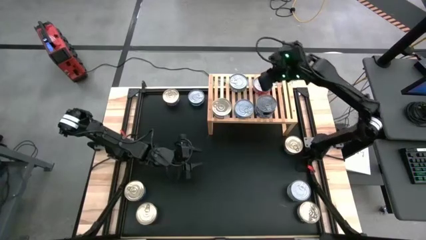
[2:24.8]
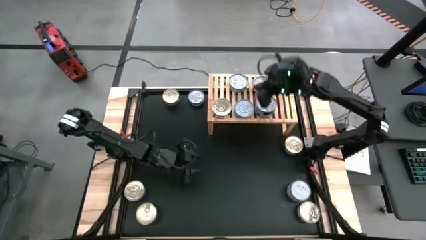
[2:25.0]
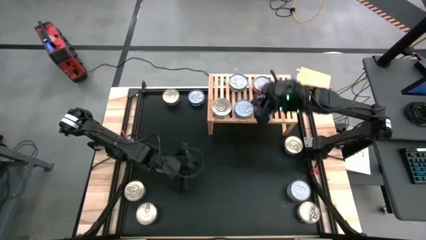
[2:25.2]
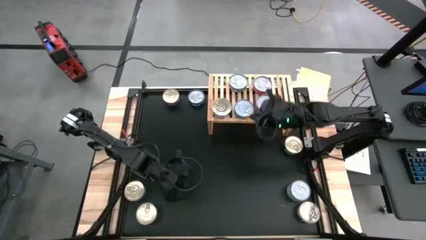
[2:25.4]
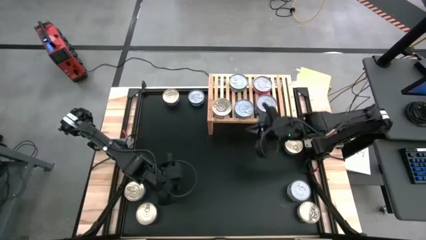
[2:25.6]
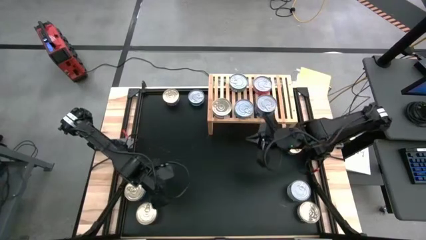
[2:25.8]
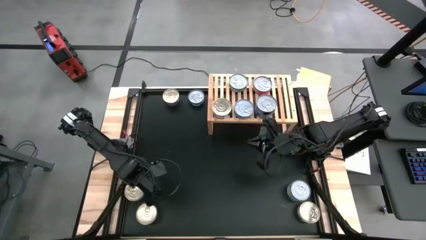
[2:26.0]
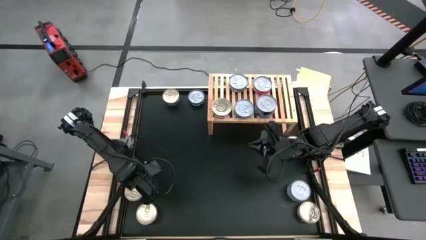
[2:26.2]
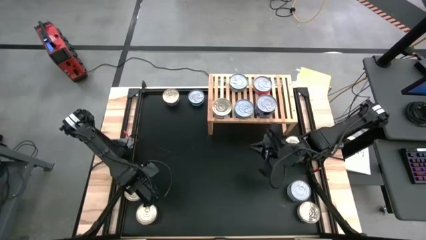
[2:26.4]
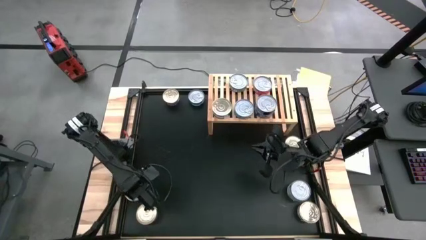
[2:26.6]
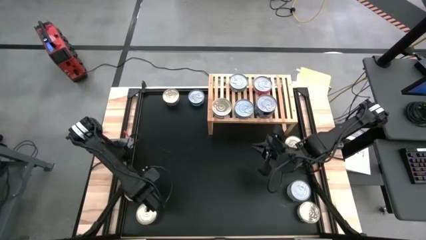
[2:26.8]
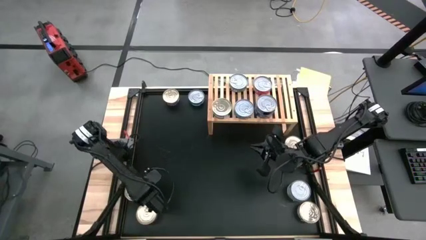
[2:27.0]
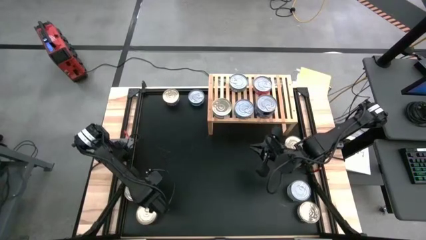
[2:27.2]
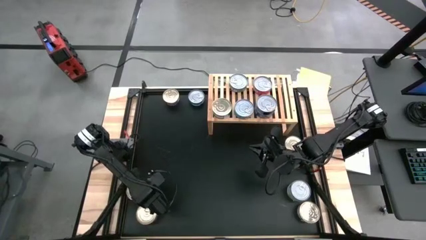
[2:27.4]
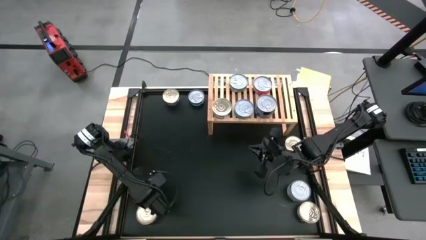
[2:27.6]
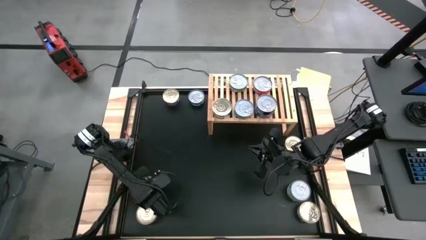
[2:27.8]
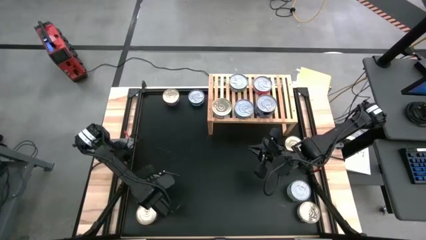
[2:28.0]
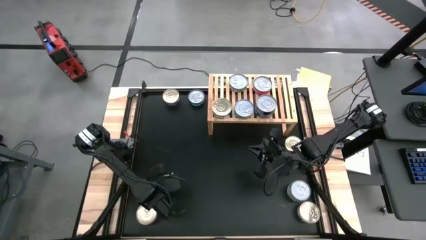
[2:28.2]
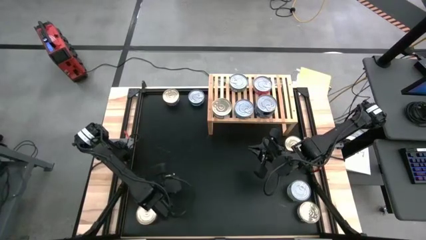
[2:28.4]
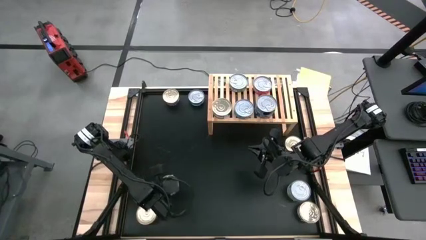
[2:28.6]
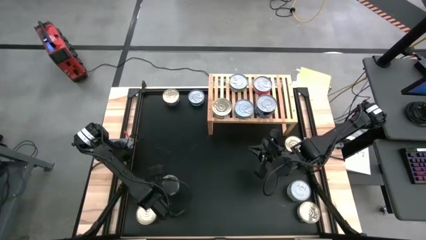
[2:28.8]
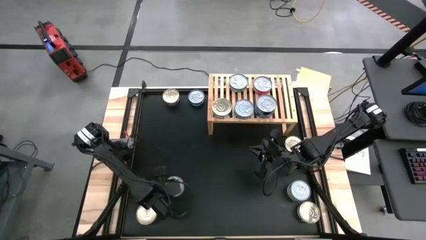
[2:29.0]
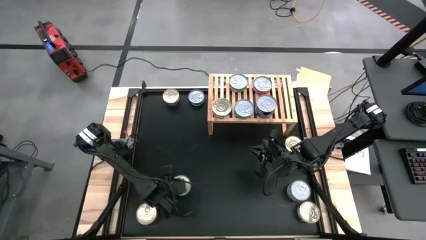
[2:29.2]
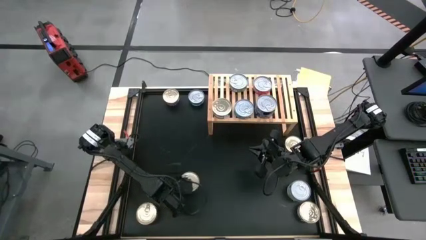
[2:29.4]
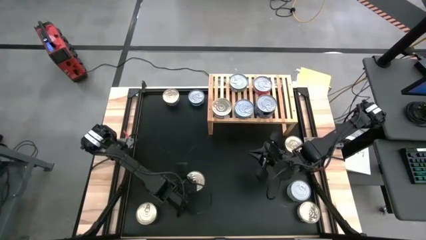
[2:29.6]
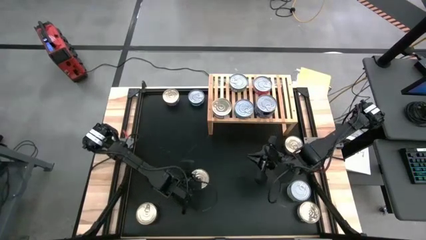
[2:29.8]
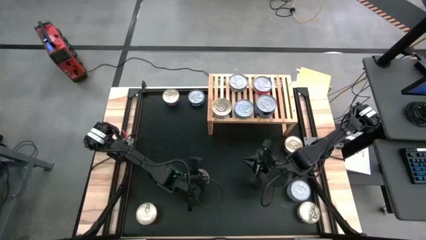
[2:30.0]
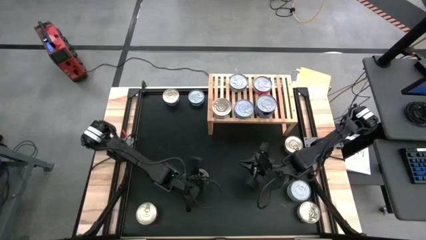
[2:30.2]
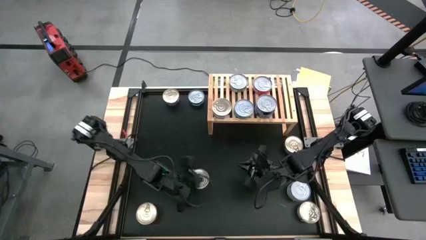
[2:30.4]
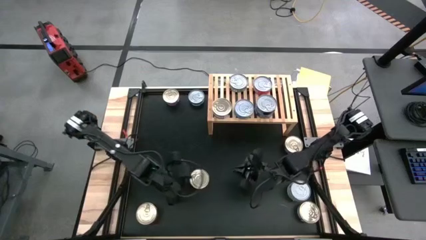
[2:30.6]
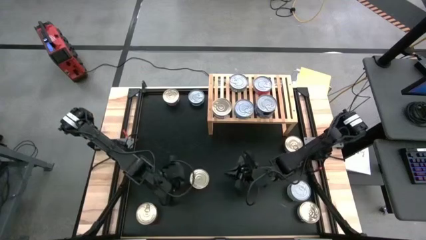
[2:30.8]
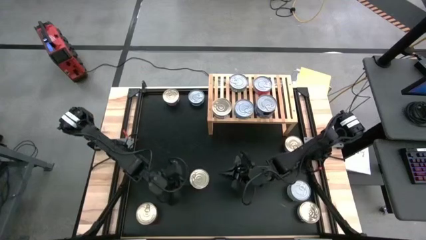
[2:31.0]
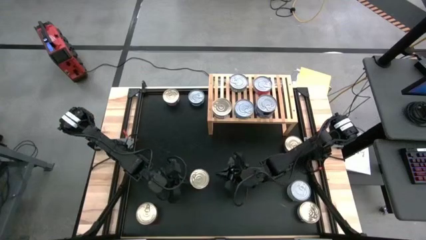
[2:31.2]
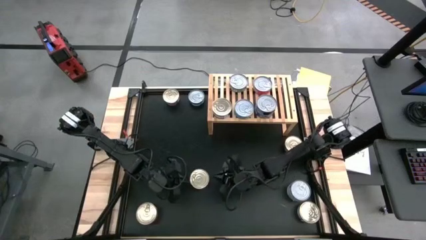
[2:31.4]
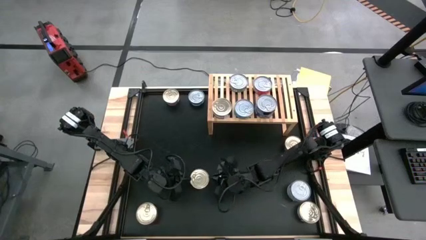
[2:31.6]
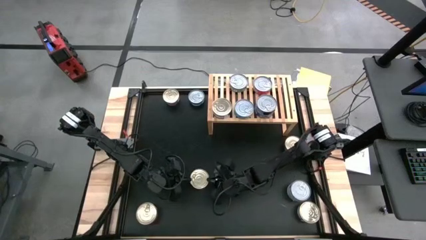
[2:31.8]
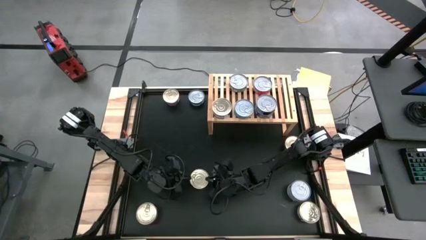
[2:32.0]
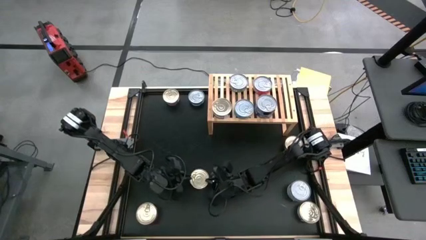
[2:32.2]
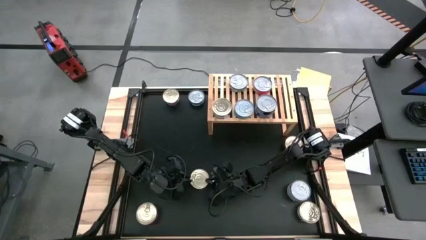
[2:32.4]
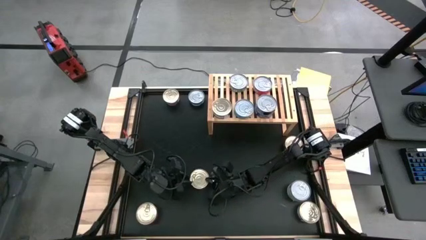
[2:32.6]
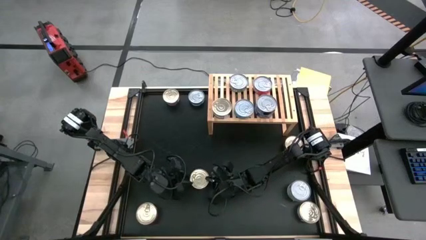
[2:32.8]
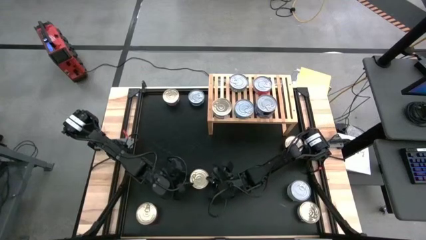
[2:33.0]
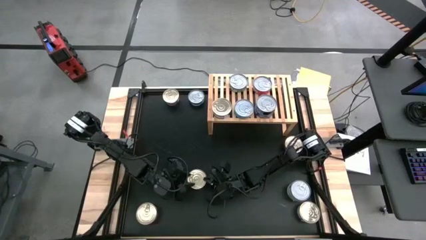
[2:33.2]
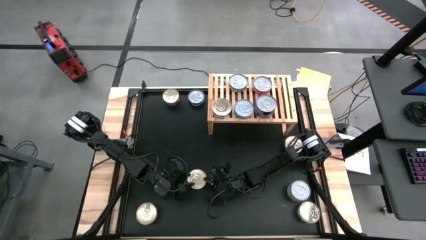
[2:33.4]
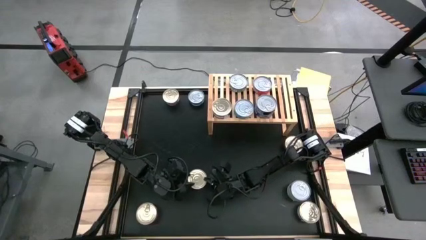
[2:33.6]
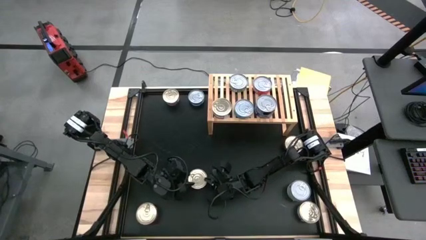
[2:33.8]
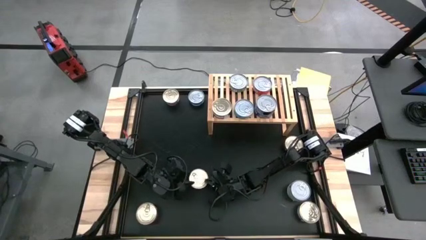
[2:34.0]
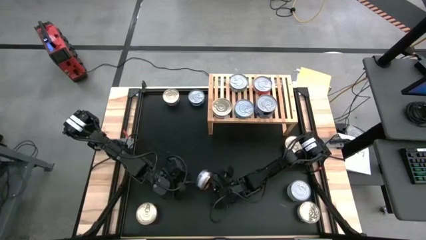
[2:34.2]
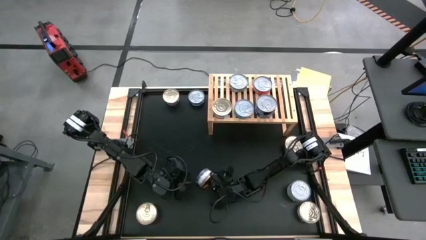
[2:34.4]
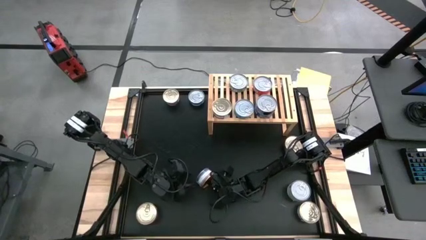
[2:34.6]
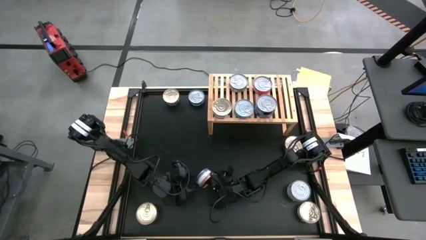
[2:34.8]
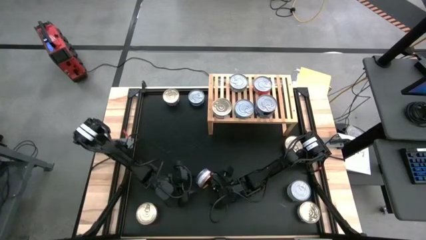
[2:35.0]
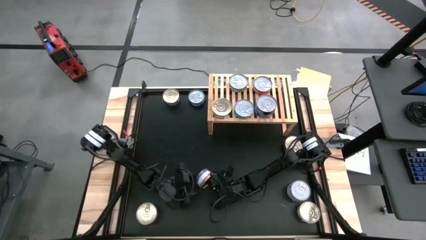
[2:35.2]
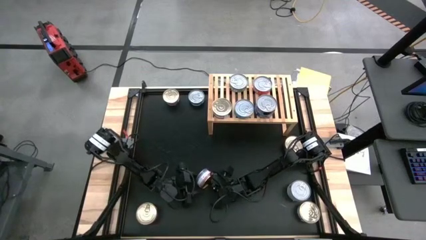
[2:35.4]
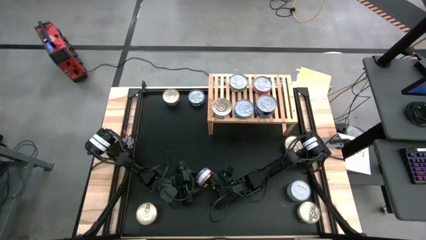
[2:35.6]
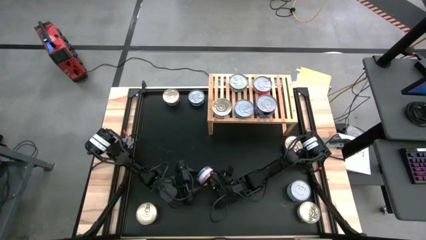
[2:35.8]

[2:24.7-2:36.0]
Task: Stack canned seafood by type on shelf
Stack the blue-pink tuna can on top of the blue-pink tuna can on the shelf
